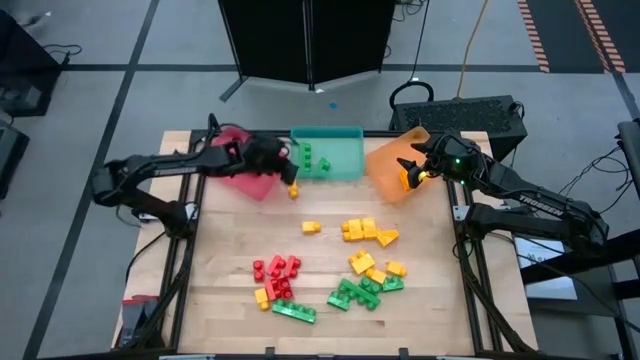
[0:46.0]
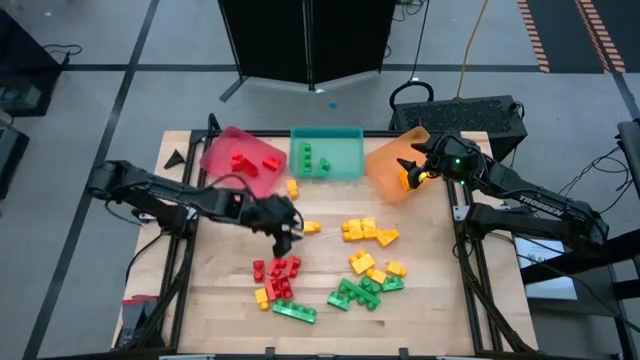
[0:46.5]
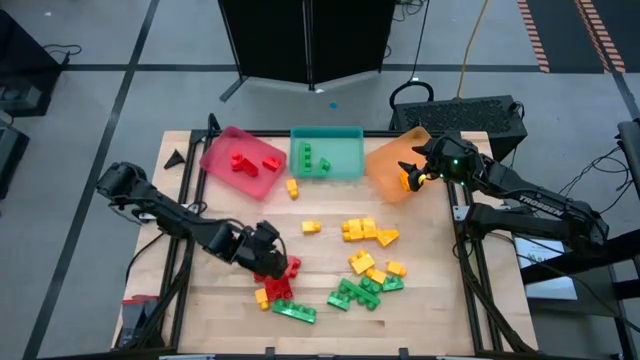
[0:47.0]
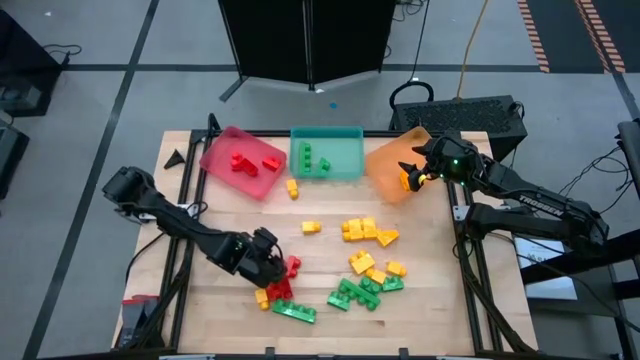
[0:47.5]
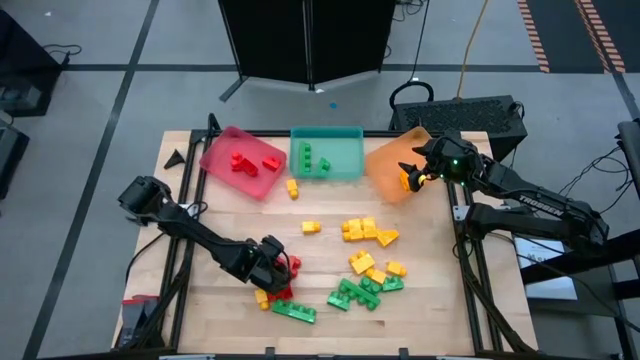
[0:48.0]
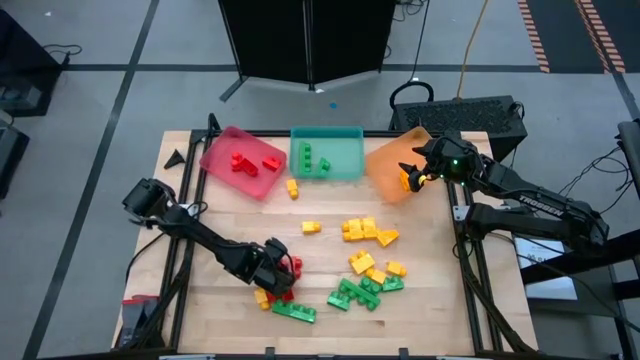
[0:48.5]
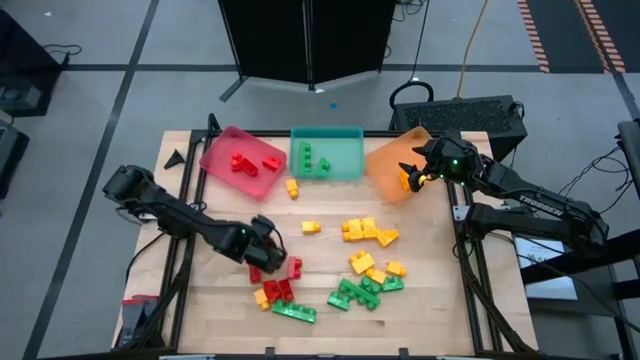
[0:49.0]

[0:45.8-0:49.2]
Task: Sort blocks
Put the red game piece into the red bin

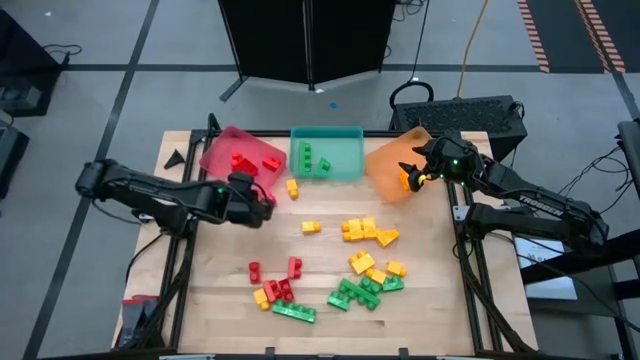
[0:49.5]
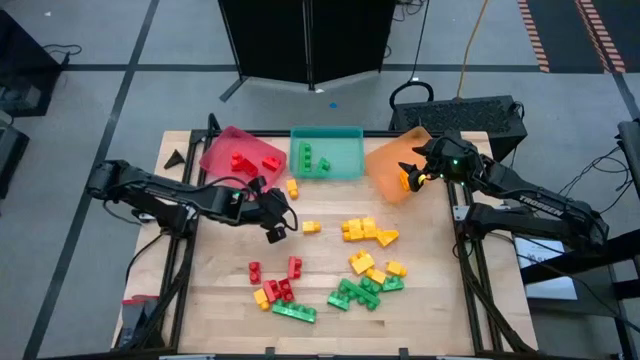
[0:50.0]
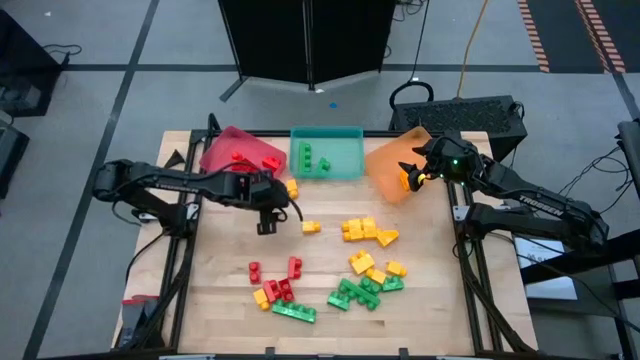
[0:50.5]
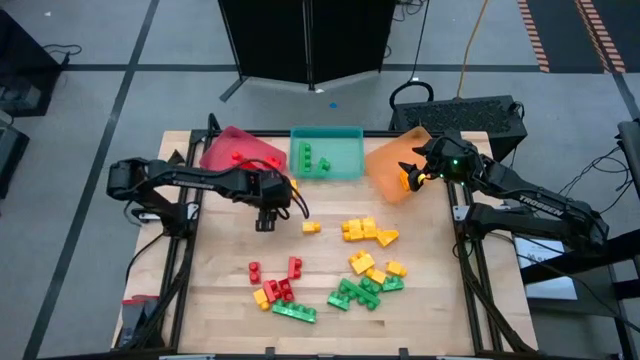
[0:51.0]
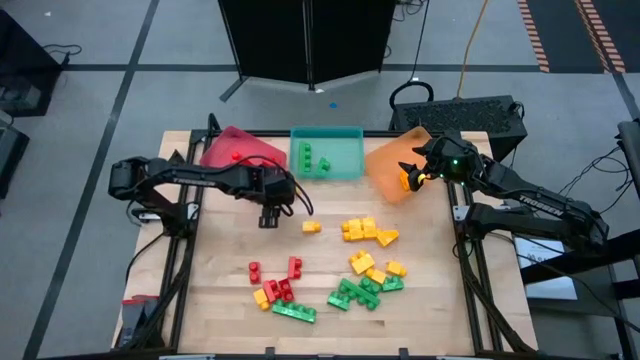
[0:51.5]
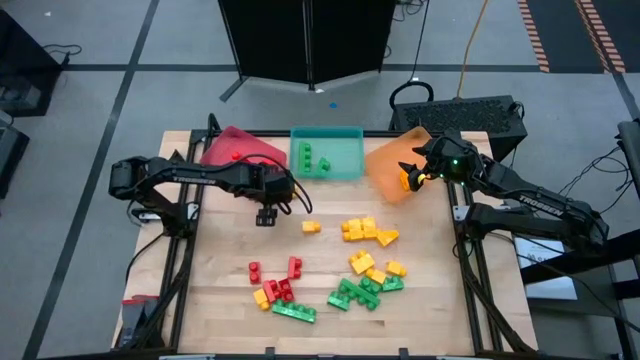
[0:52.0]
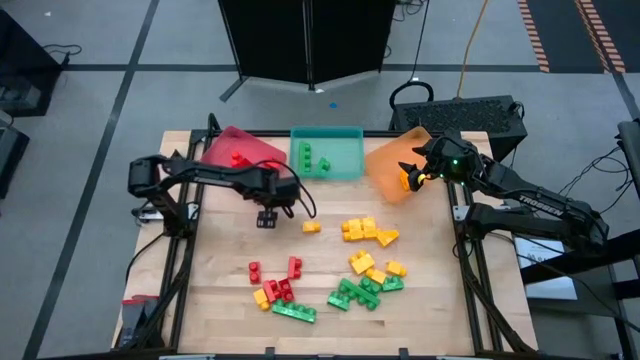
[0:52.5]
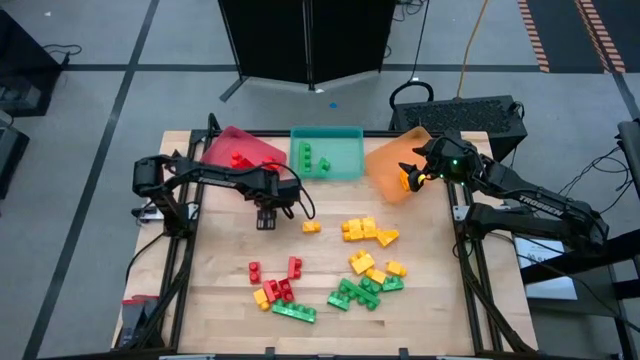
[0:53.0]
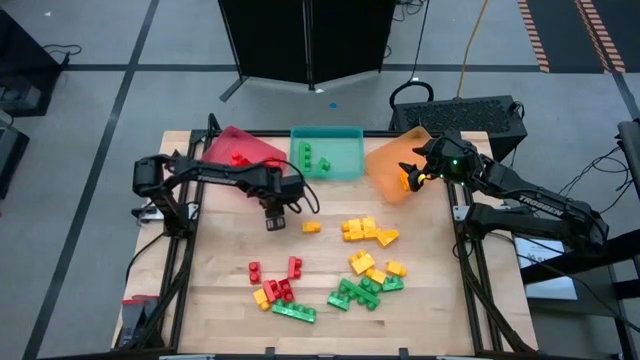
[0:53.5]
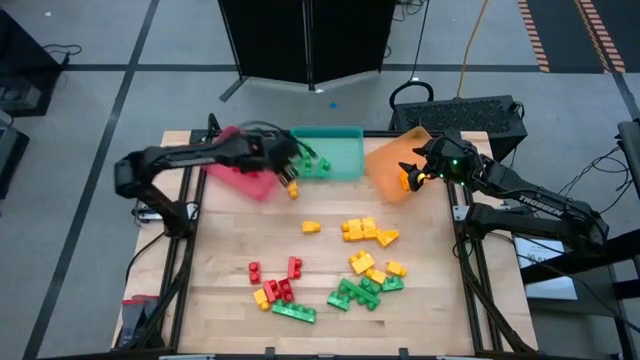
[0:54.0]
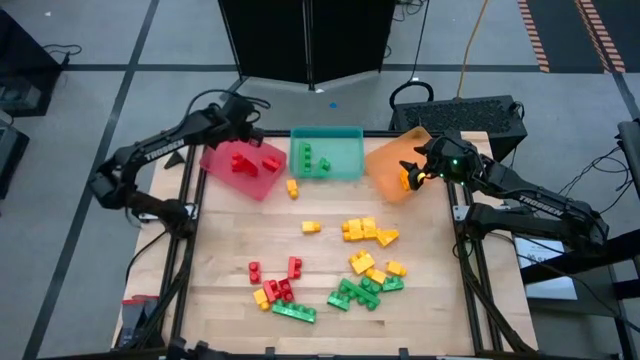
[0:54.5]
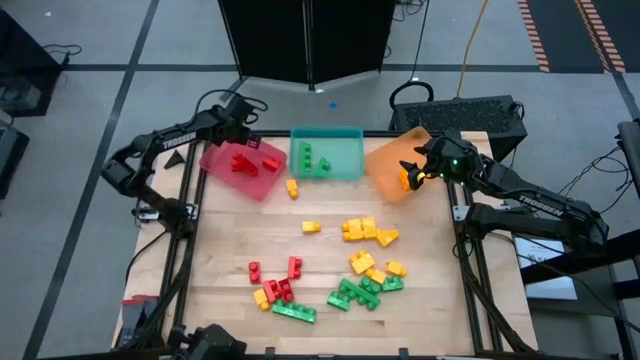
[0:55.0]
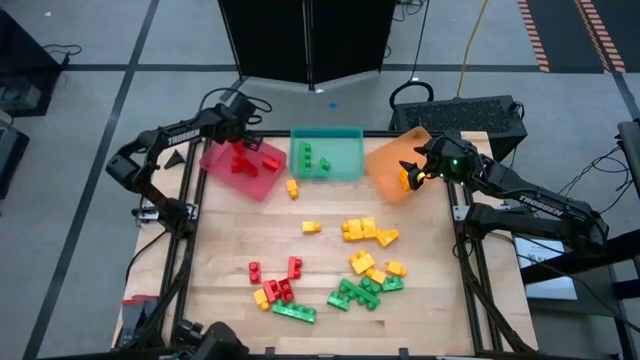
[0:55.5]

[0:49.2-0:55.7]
Put the red game piece into the red bin

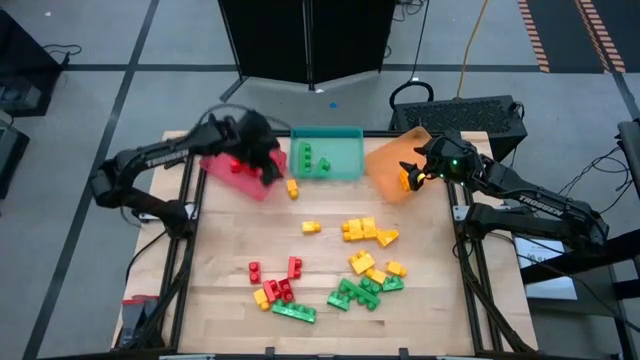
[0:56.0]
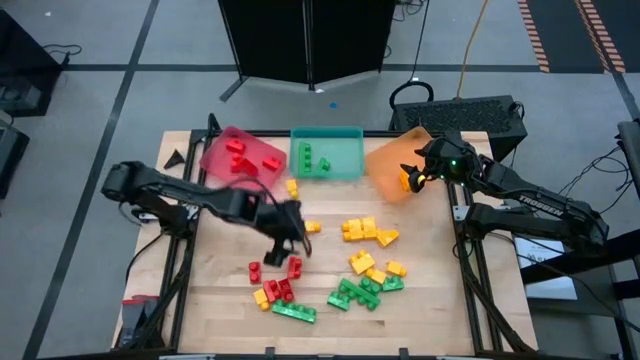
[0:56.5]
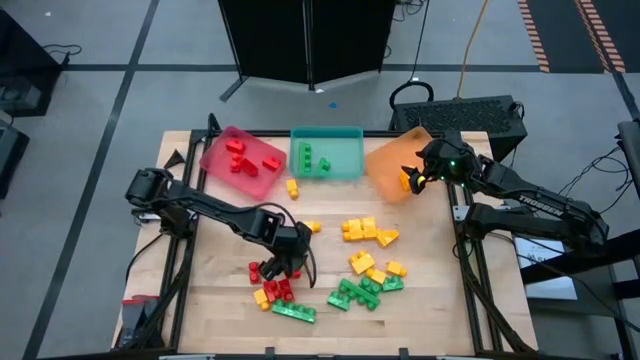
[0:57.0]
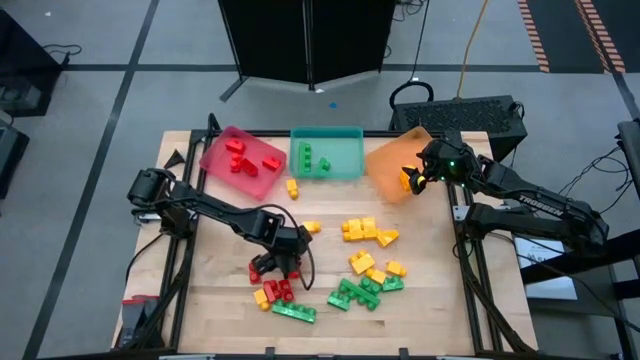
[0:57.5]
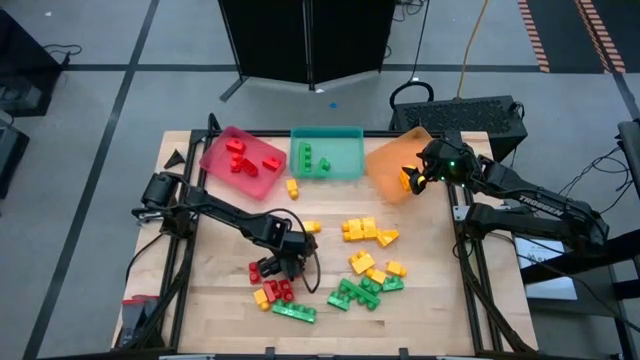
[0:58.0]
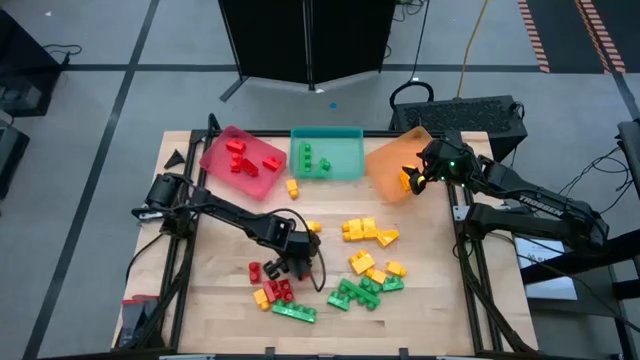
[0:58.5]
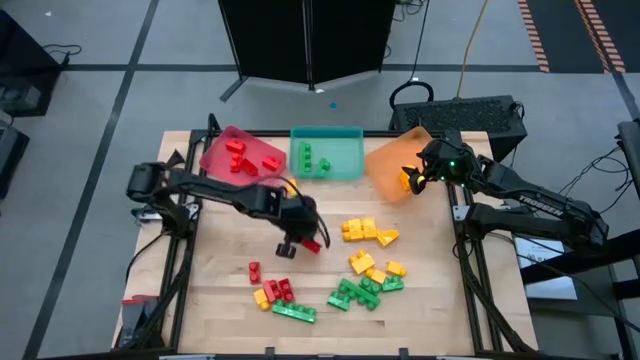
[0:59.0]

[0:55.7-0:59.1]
Put the red game piece into the red bin

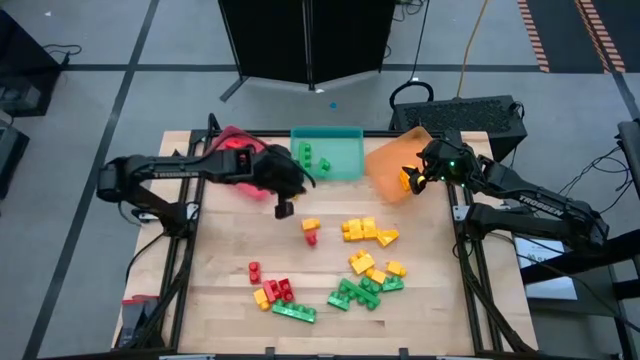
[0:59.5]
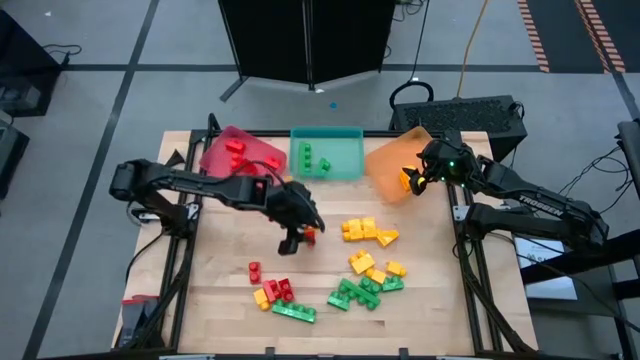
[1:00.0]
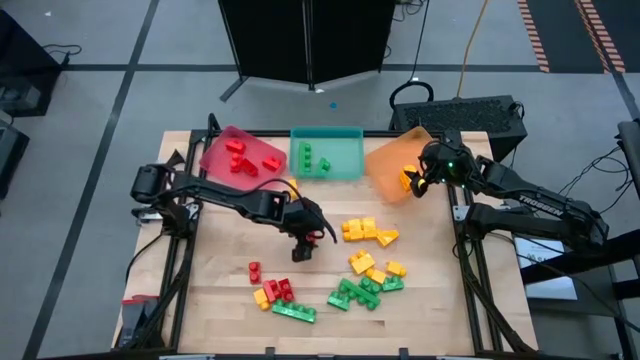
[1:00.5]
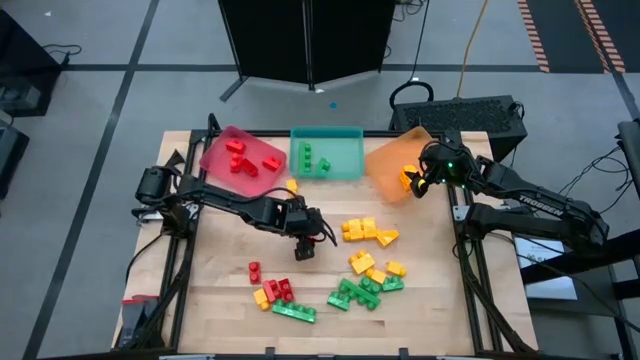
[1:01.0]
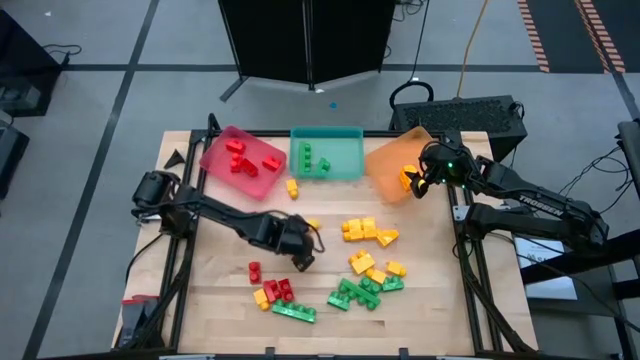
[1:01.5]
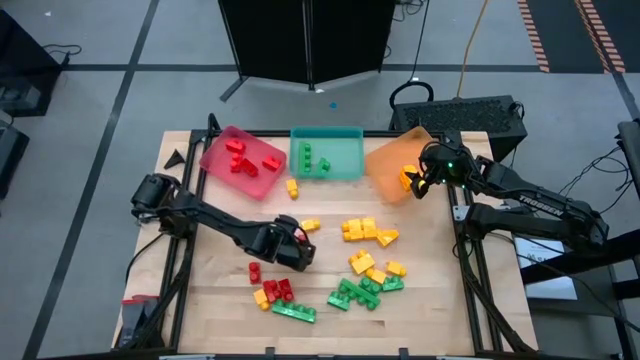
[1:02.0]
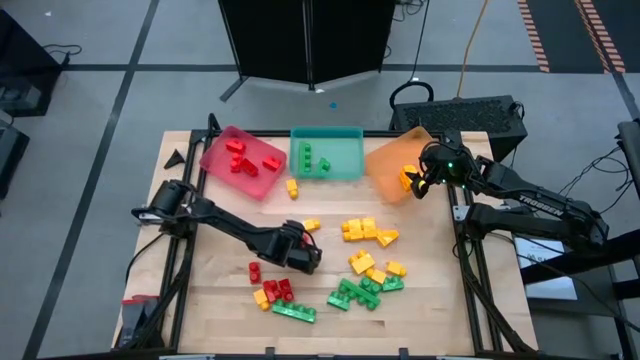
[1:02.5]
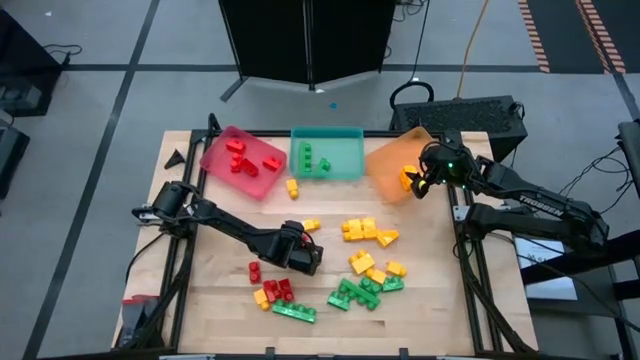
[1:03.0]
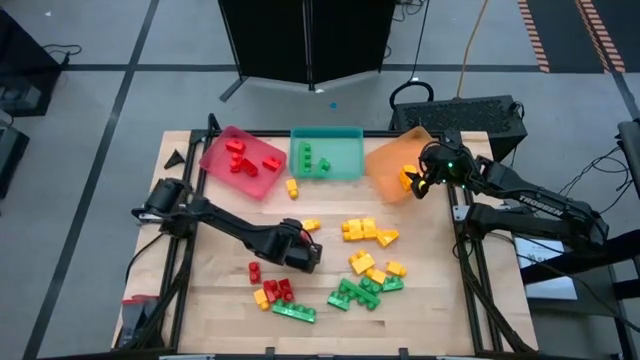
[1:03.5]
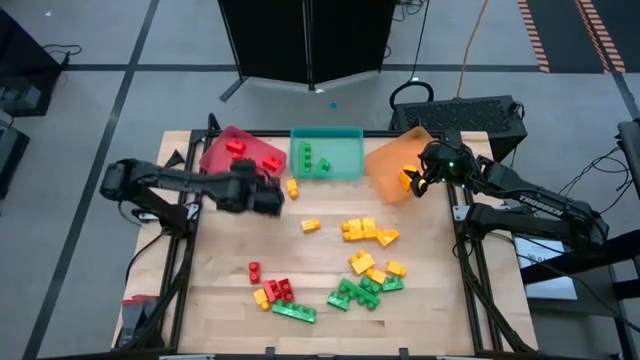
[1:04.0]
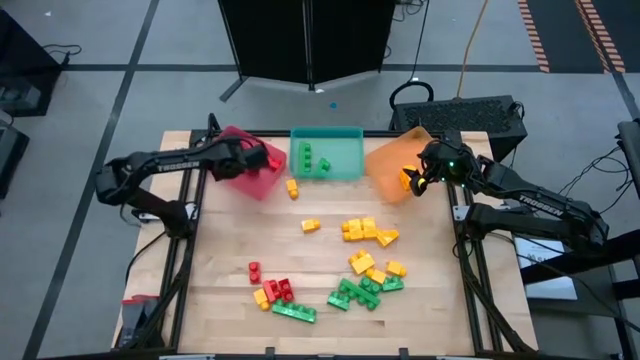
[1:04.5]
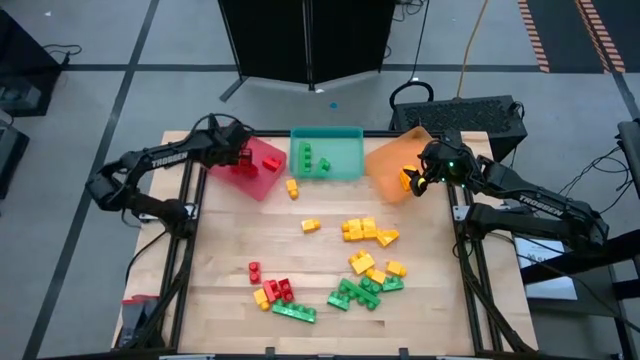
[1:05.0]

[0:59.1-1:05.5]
Put the red game piece into the red bin

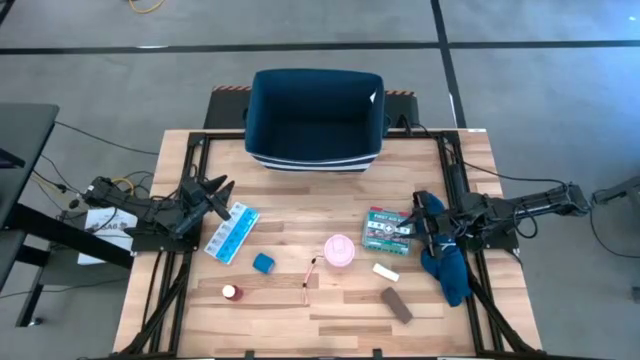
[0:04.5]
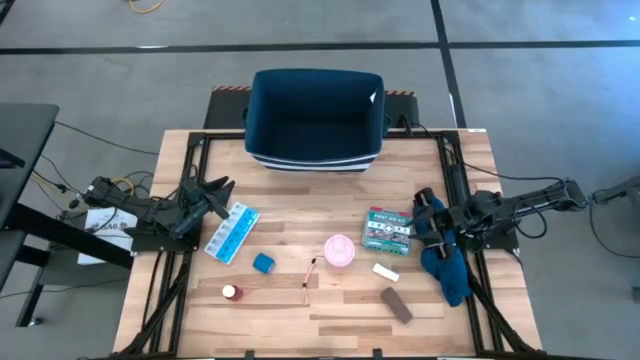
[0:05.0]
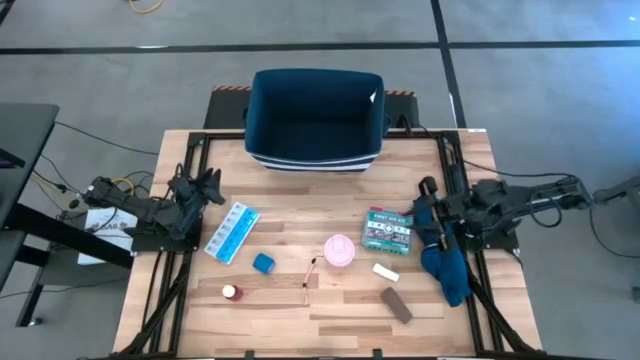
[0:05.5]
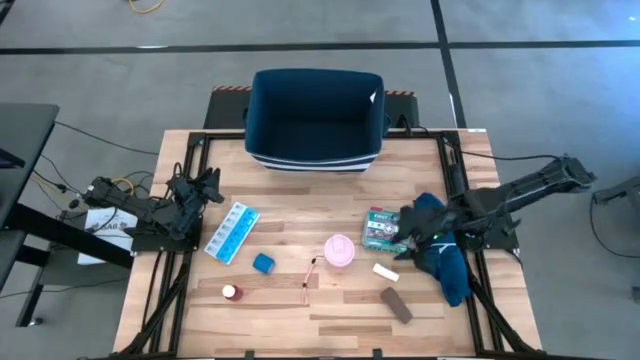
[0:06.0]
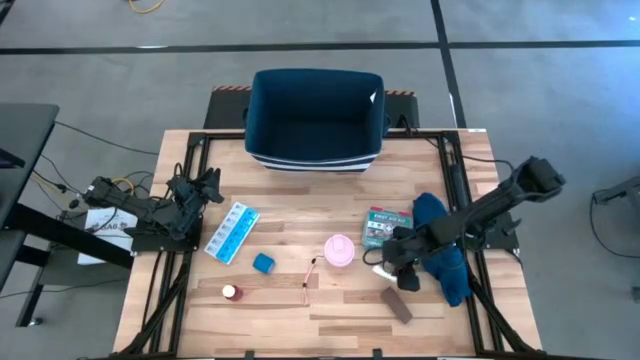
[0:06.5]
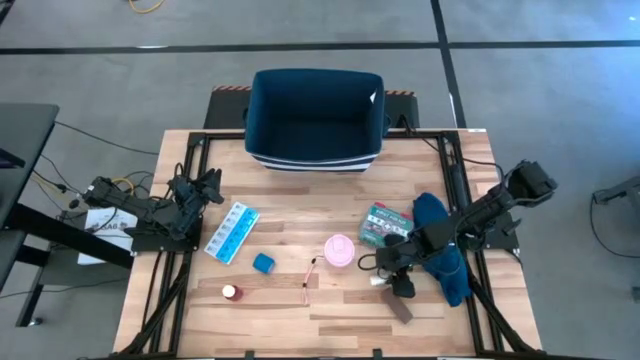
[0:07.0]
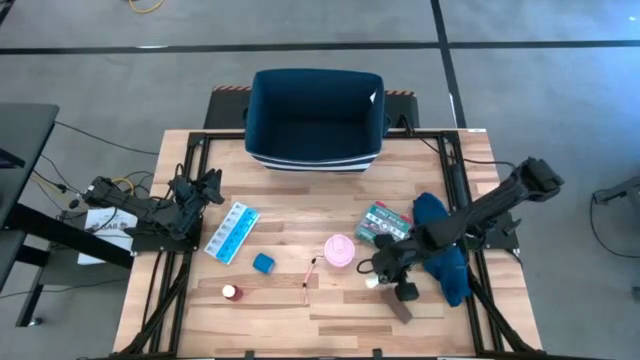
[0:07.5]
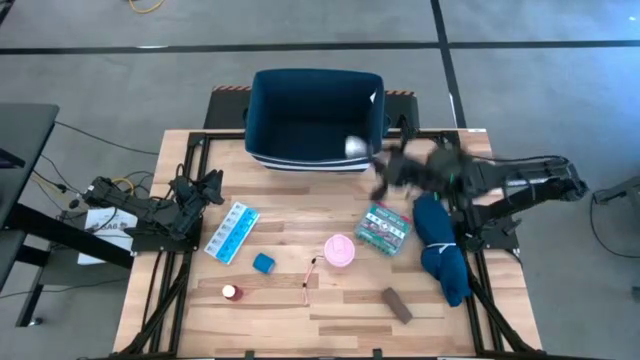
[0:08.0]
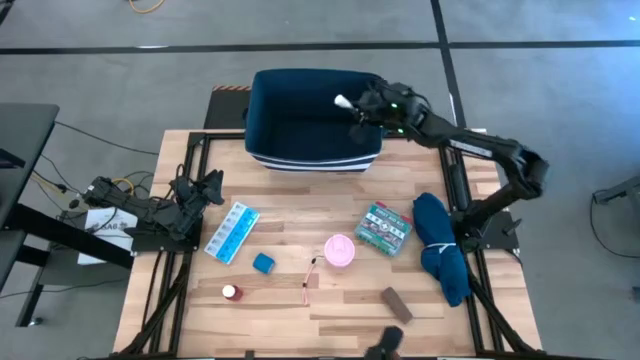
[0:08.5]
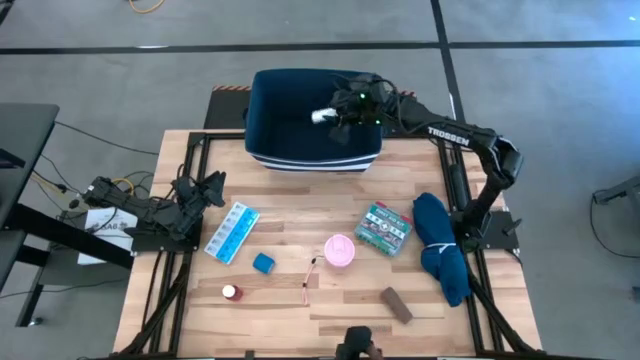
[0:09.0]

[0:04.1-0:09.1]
Task: Pick & place medical supplies in basket/bin
Put the white gauze in the blue bin
